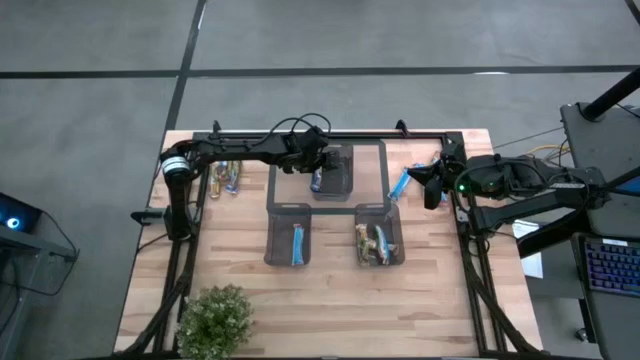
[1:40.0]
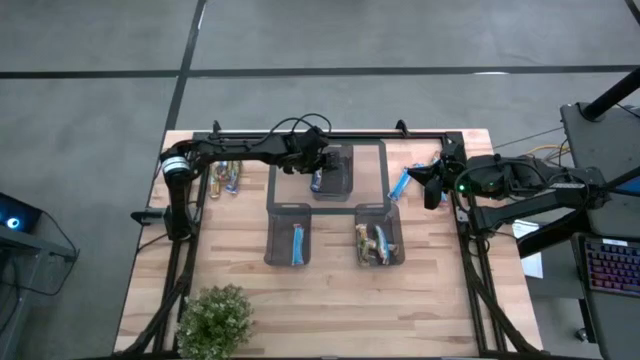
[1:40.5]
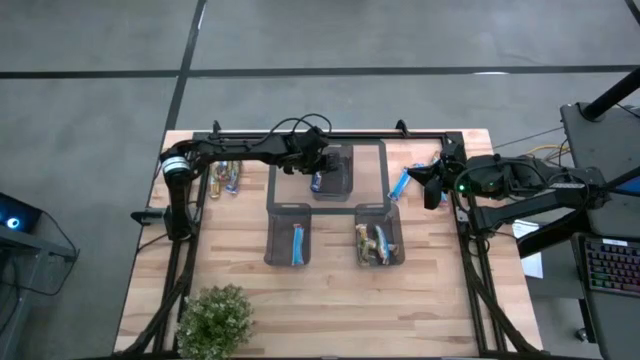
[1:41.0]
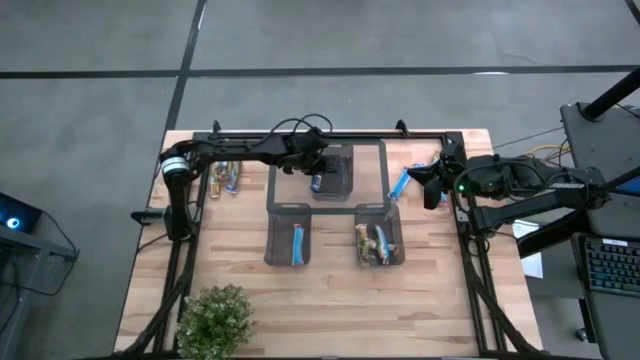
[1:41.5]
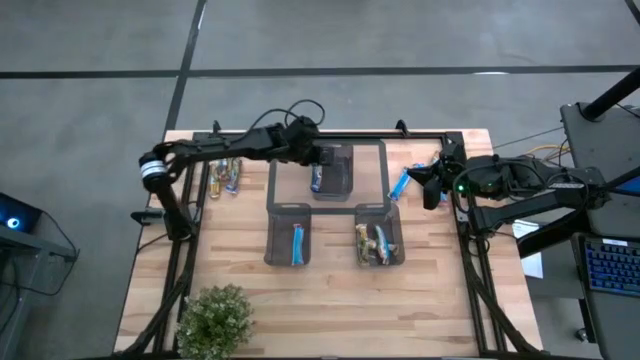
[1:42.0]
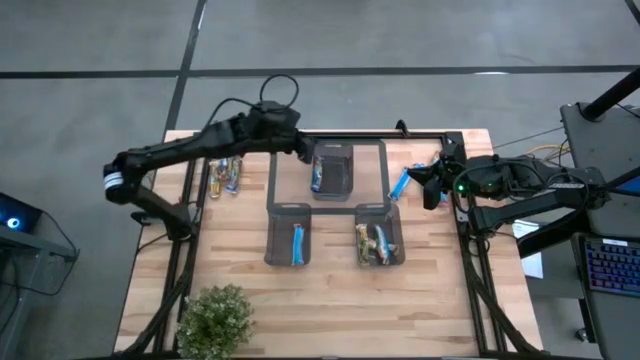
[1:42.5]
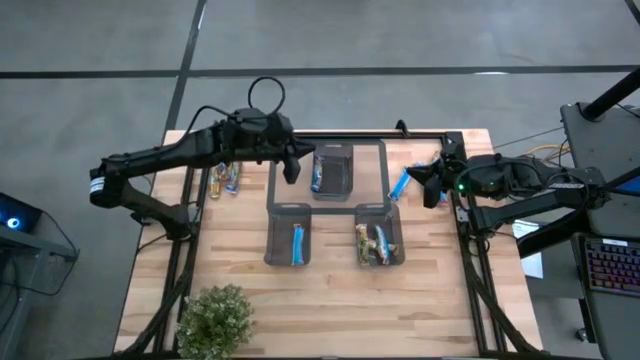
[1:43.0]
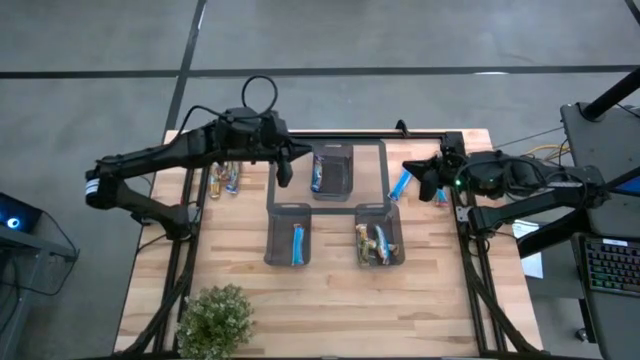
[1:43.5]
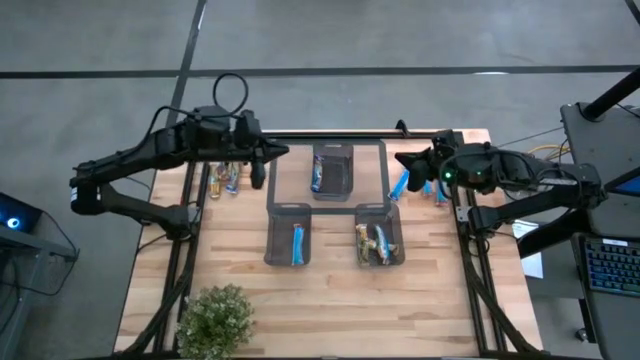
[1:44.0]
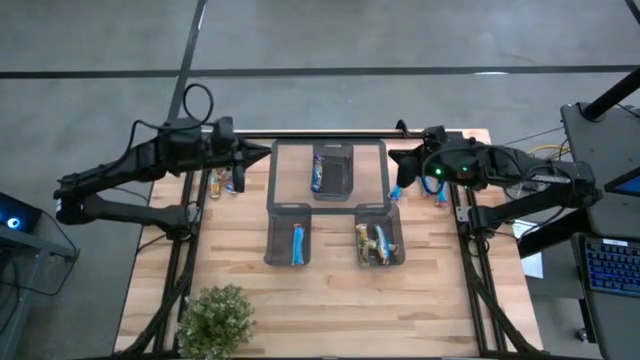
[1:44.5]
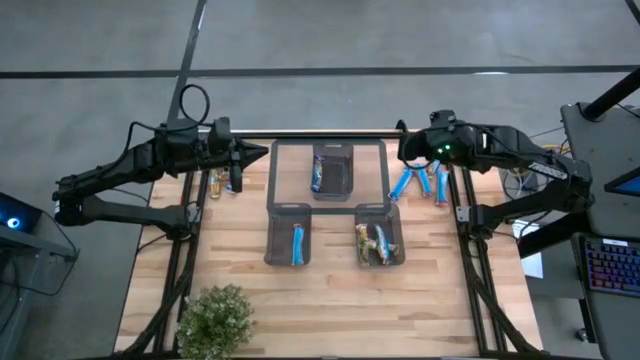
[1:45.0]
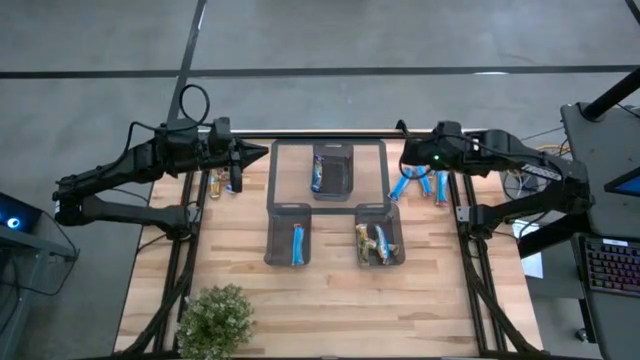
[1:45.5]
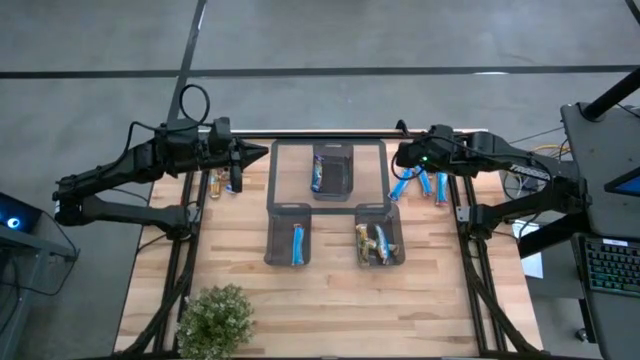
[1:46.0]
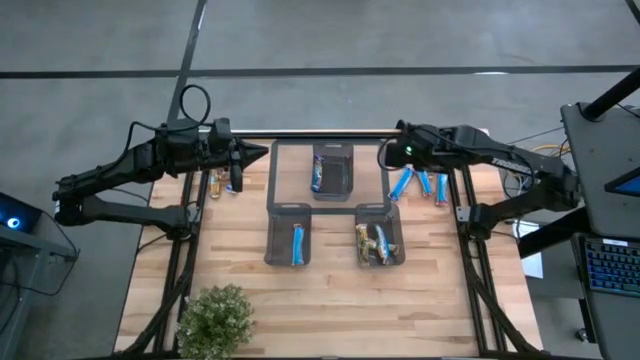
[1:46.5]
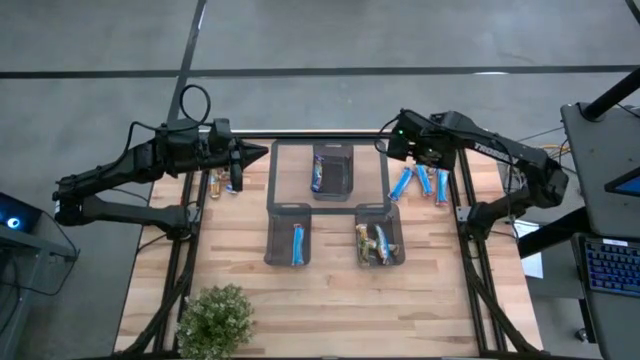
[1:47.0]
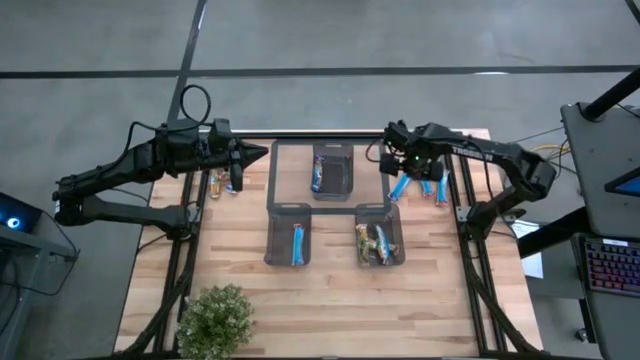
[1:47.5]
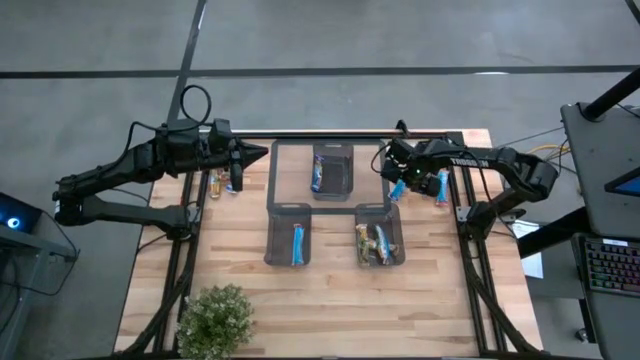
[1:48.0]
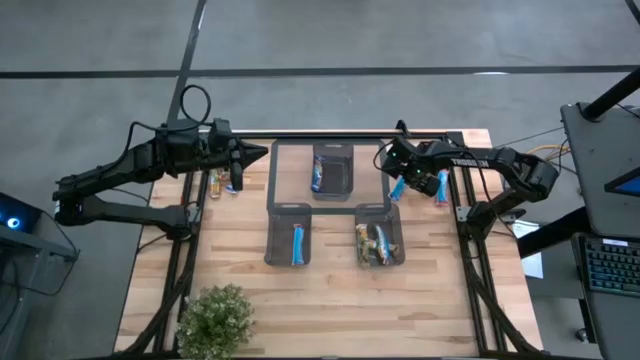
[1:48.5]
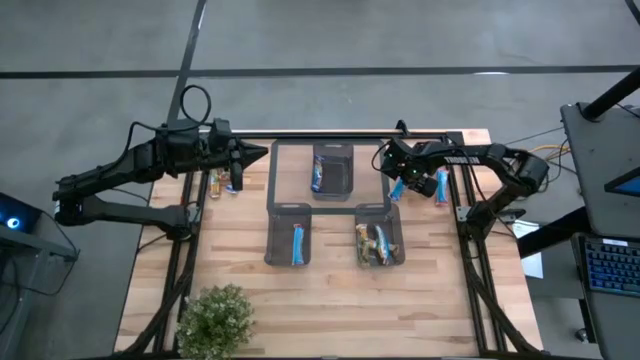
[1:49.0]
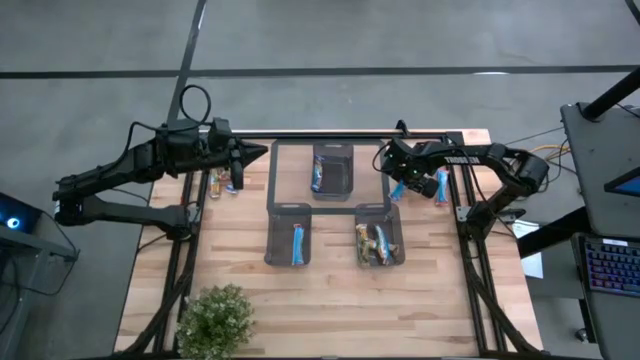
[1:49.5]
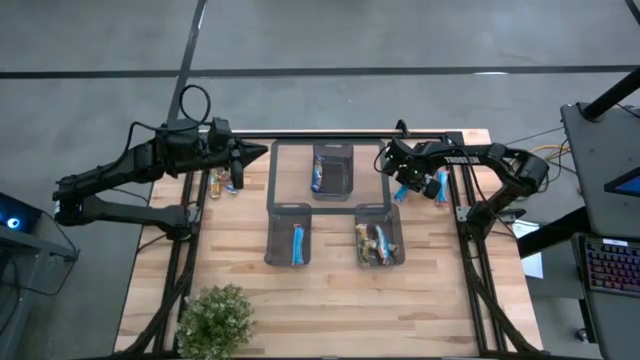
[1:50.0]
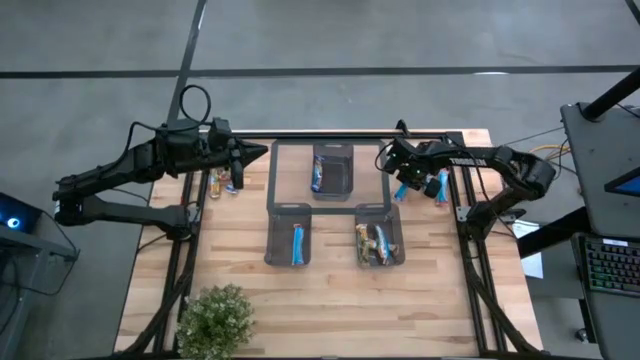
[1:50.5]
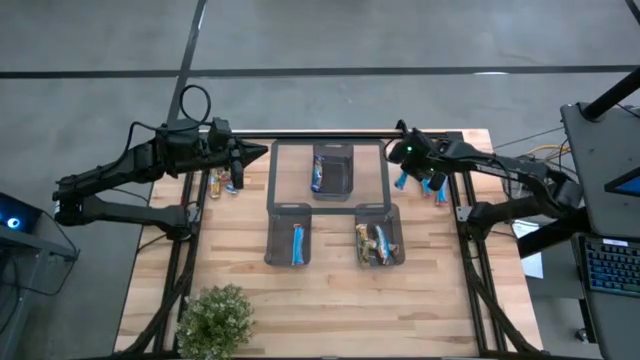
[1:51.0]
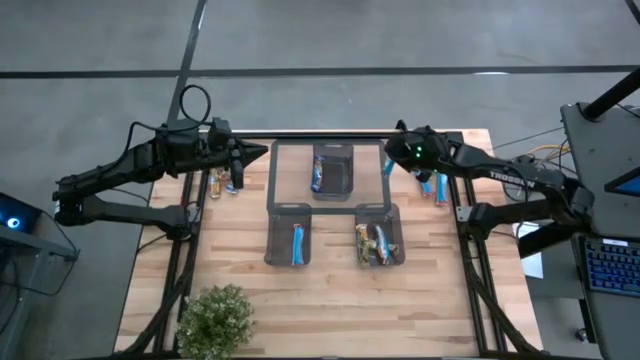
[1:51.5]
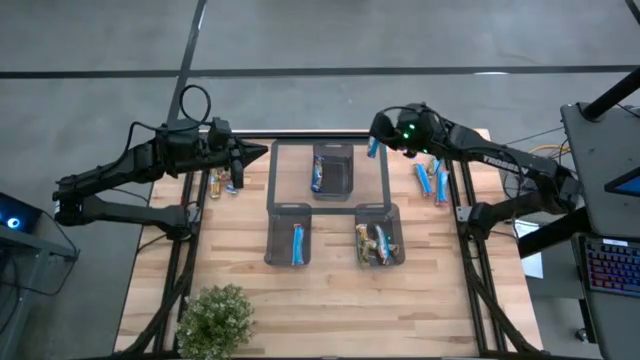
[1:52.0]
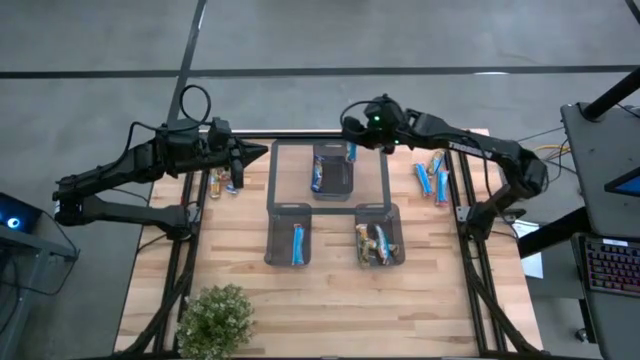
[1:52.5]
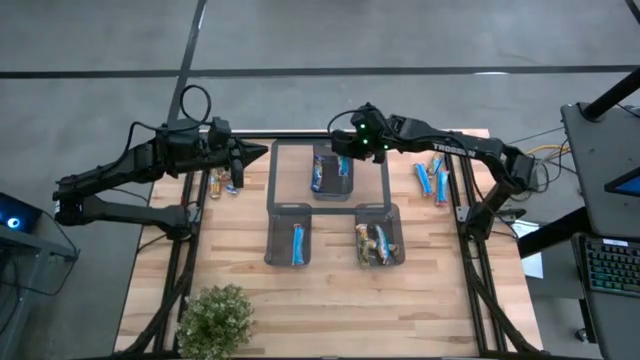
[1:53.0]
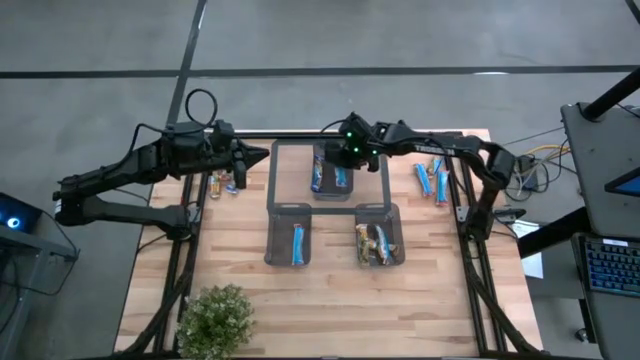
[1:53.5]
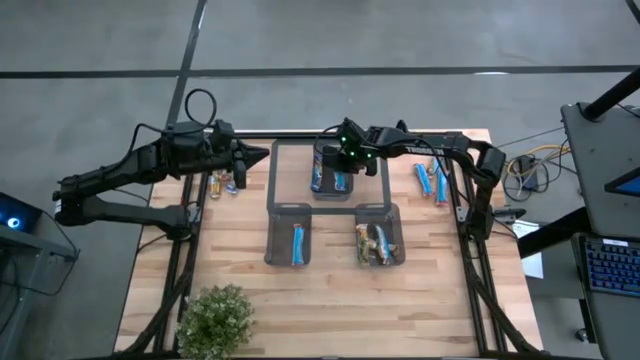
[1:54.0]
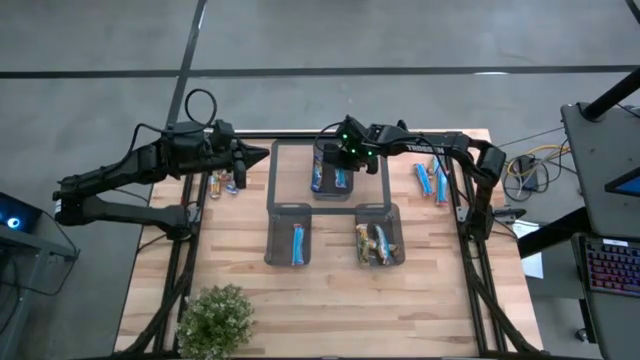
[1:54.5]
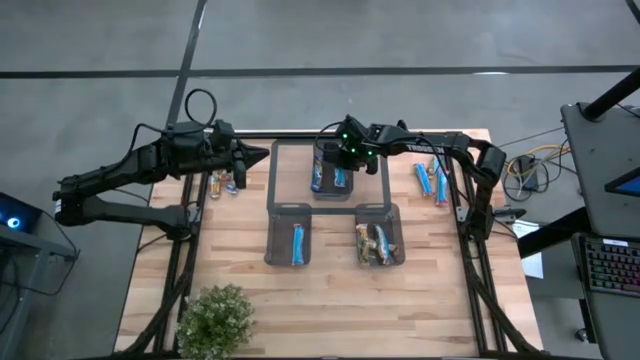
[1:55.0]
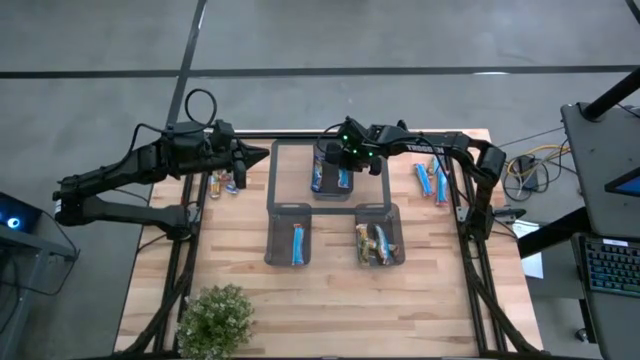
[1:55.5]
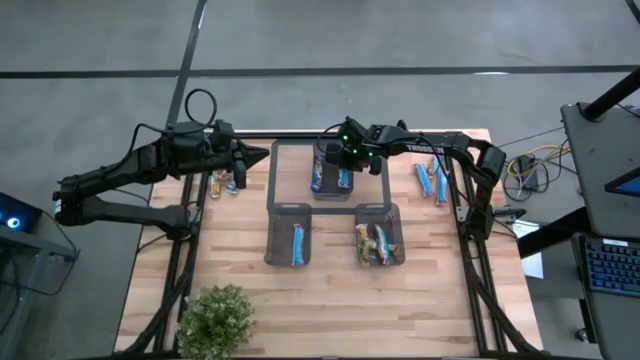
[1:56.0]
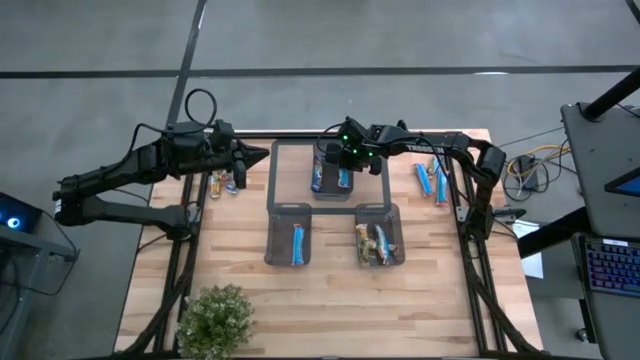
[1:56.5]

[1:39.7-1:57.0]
Task: Pick and place Granola Bars by type
Put the blue granola bar into the top black bin

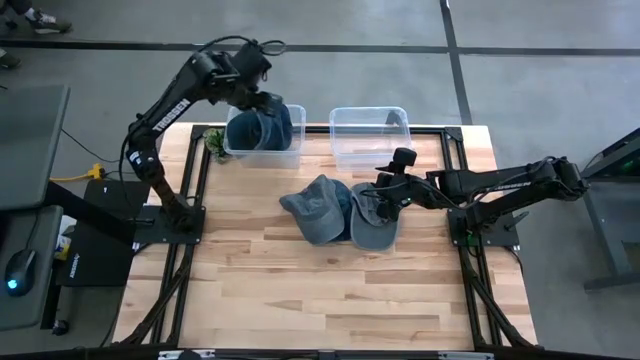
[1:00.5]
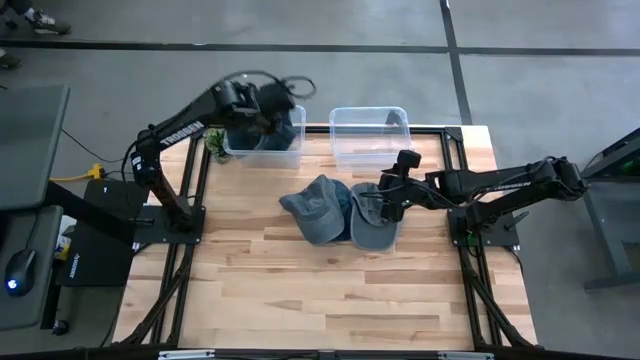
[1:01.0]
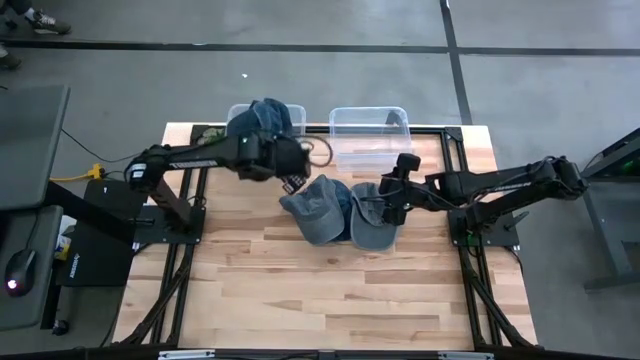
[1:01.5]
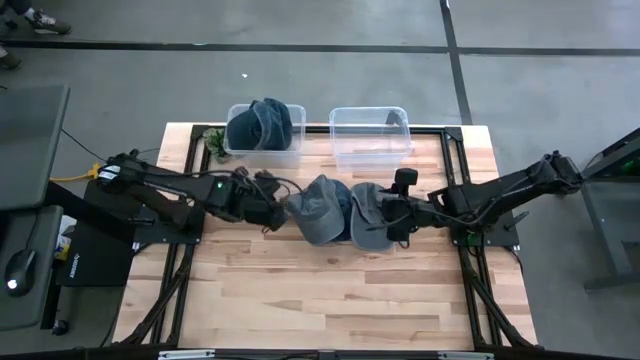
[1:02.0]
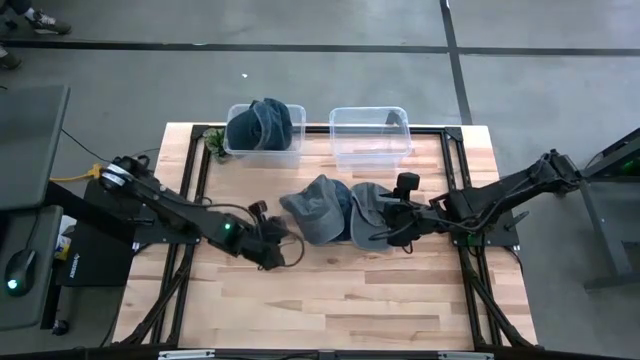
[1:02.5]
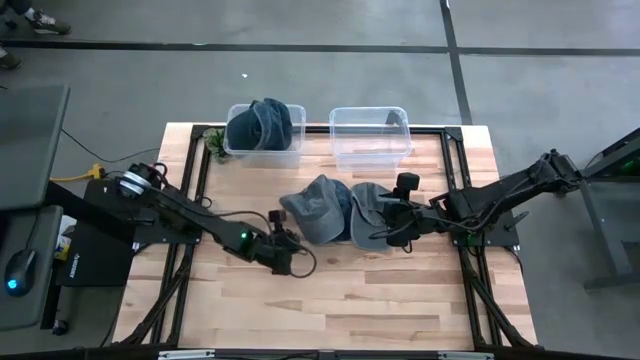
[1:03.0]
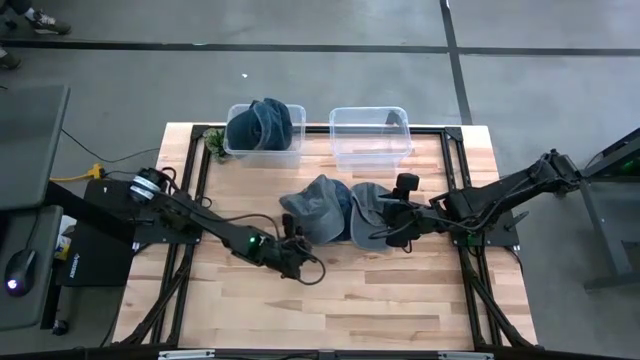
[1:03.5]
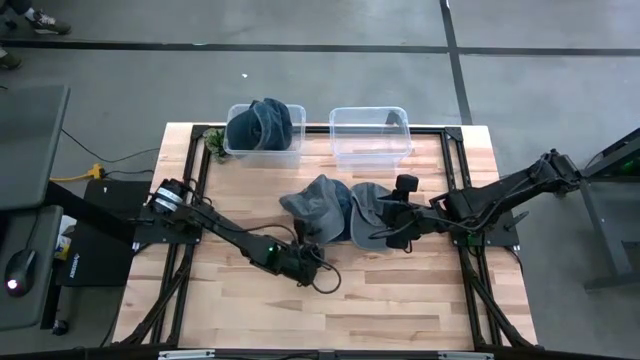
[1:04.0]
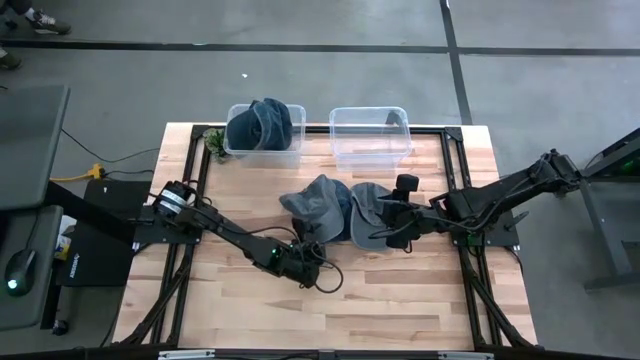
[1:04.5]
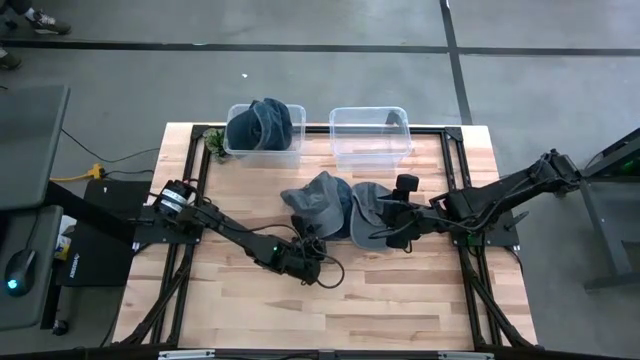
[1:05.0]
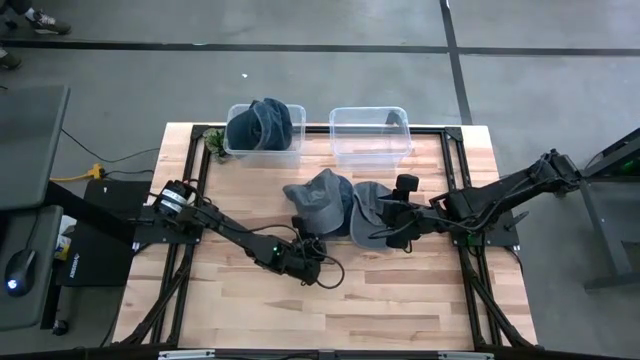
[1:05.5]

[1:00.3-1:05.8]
Task: Pick & Place hat
Put the left top gray cap into the right transparent bin
